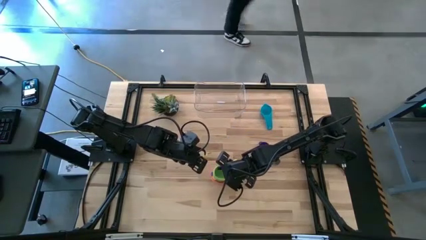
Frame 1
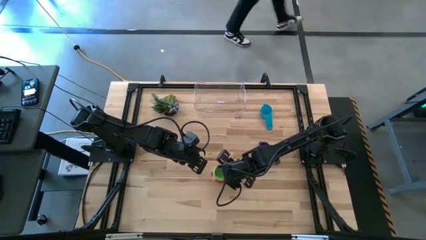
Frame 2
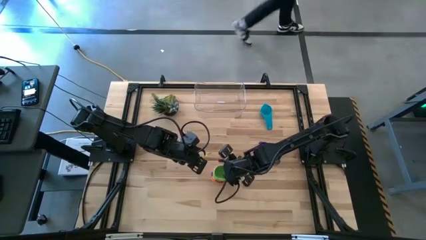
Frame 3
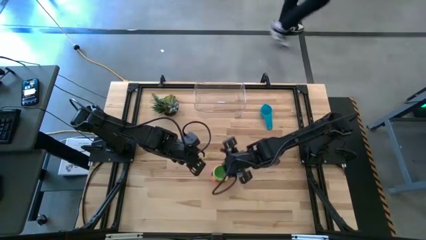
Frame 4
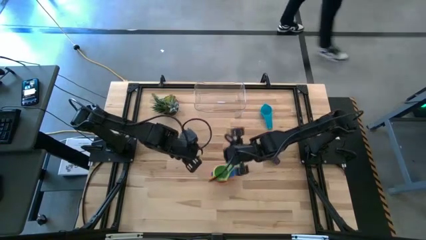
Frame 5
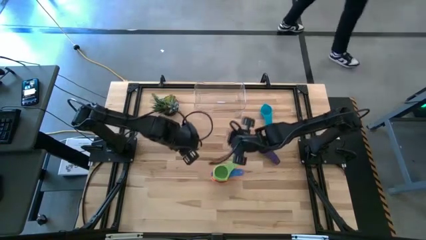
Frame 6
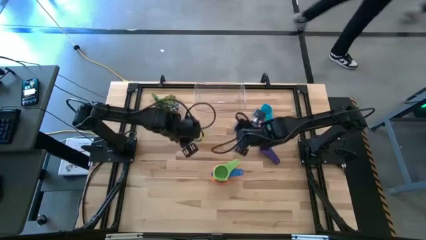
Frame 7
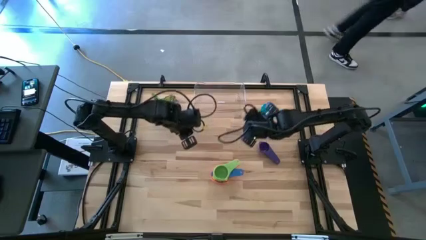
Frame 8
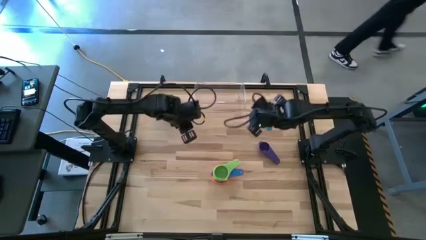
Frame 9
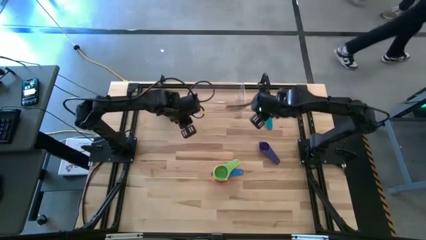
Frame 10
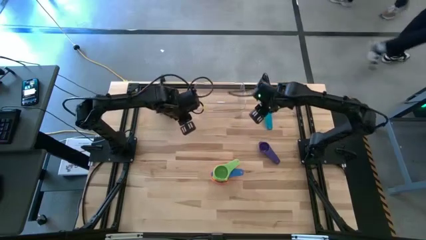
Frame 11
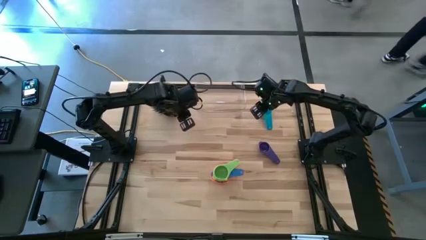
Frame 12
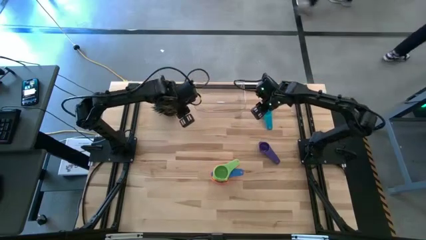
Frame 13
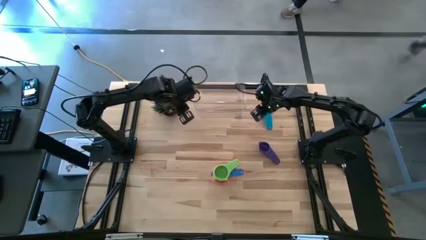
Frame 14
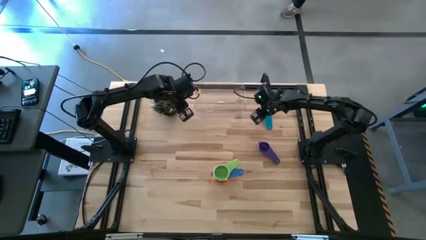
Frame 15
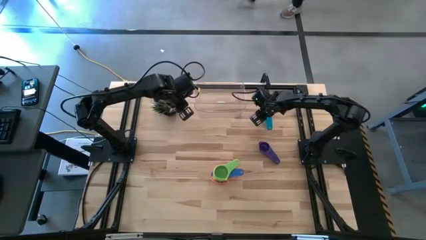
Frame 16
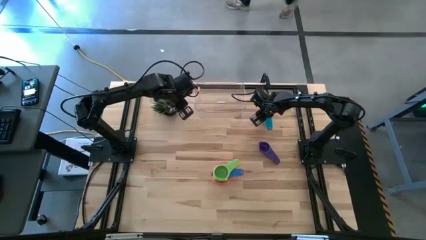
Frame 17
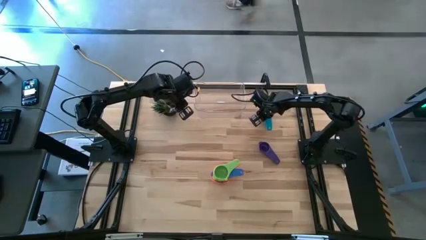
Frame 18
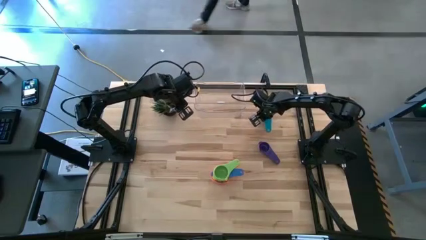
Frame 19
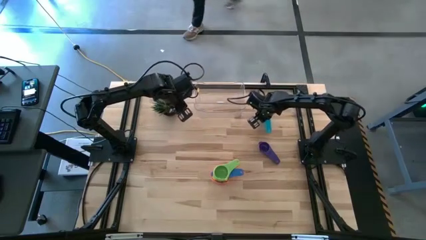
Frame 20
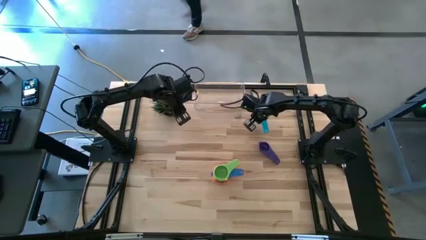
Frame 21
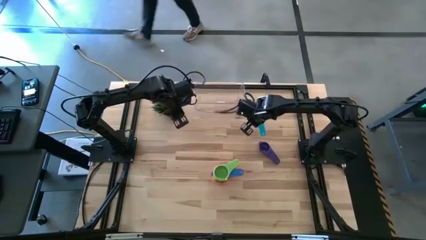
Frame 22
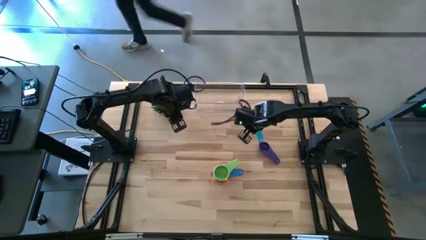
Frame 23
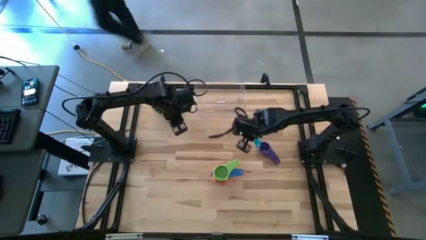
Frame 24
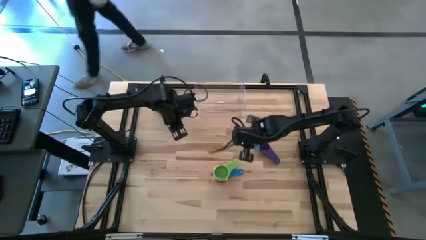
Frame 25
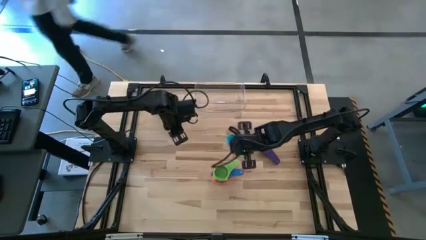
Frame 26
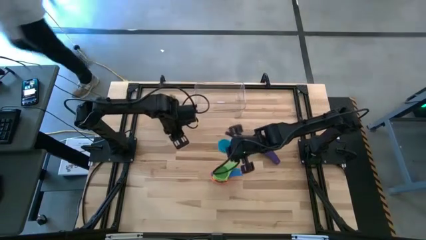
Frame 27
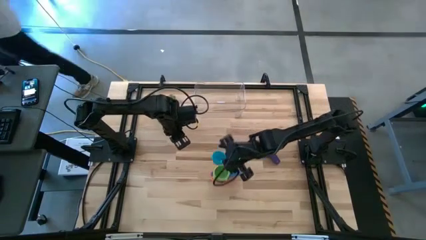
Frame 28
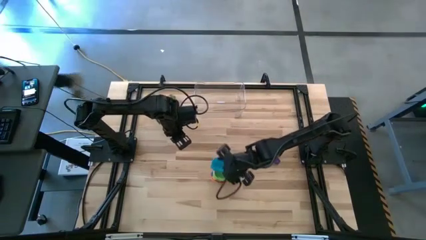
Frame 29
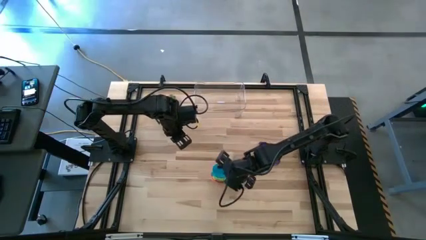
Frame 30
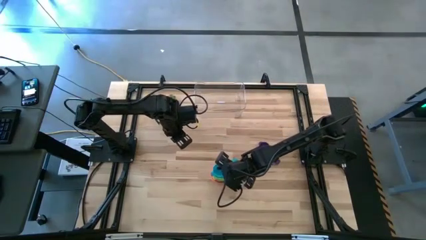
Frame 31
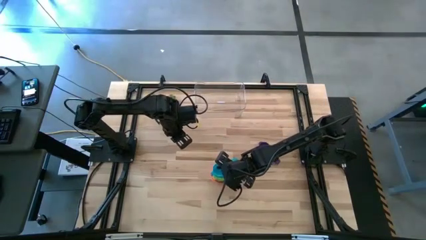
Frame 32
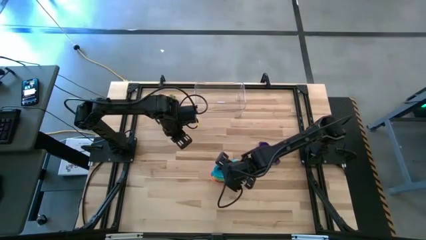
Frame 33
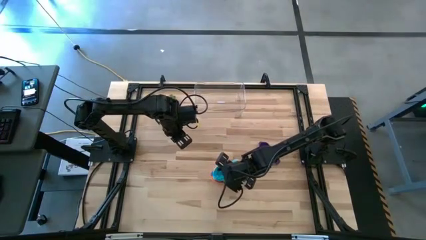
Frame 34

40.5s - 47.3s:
Task: Nest measuring cups in basket
Stack the light blue measuring cup on the green measuring cup

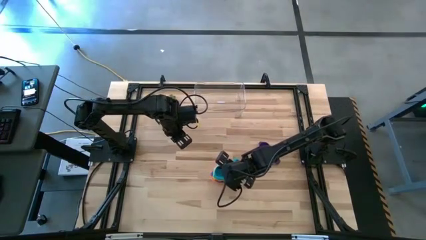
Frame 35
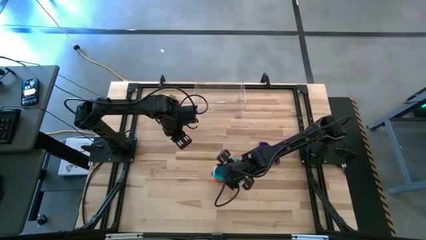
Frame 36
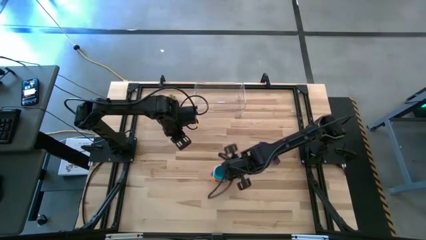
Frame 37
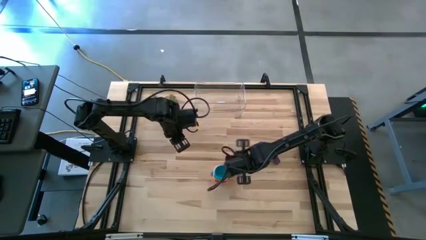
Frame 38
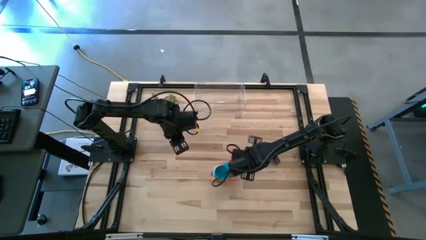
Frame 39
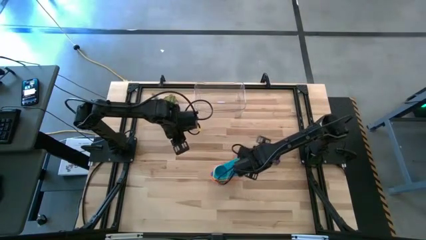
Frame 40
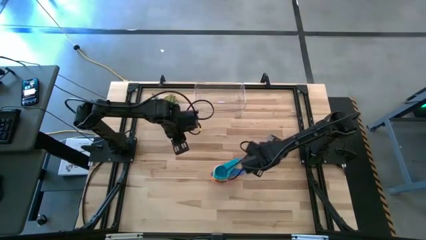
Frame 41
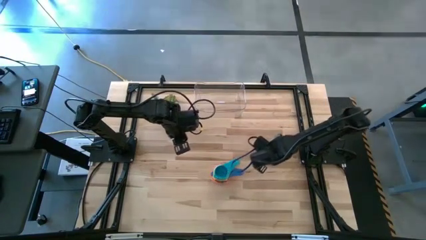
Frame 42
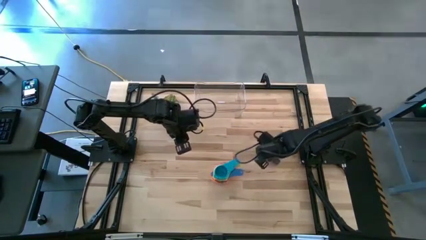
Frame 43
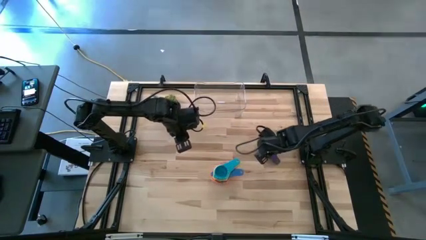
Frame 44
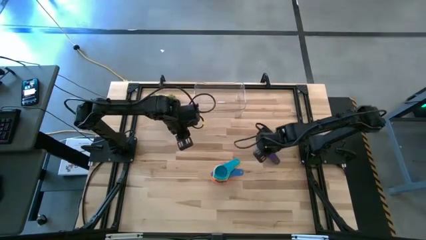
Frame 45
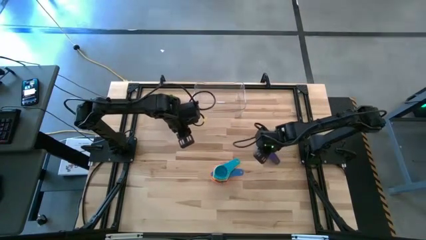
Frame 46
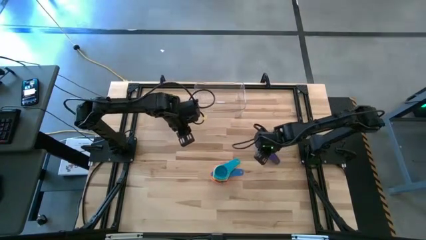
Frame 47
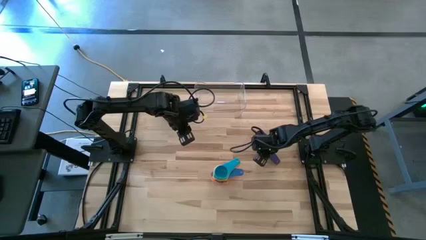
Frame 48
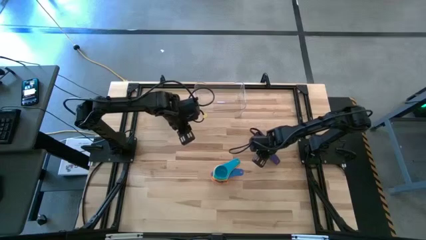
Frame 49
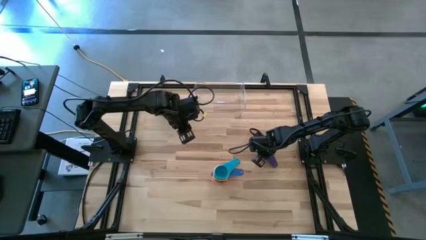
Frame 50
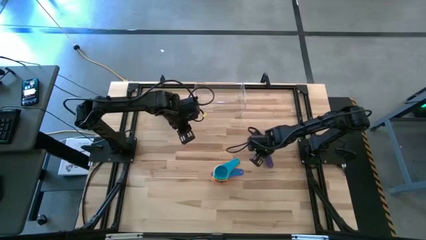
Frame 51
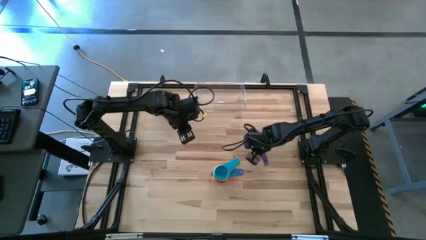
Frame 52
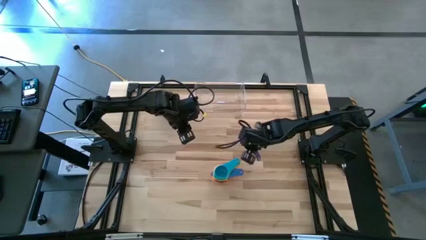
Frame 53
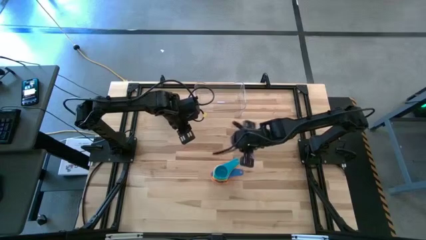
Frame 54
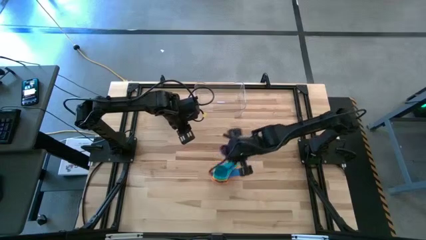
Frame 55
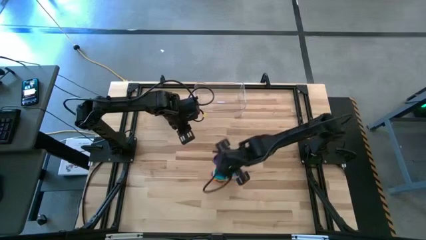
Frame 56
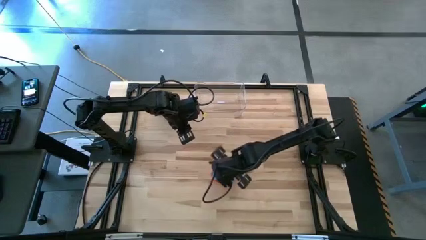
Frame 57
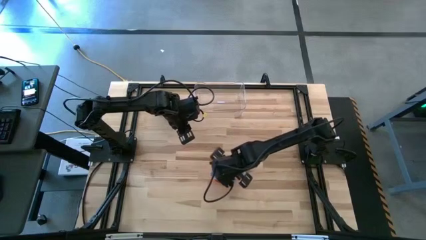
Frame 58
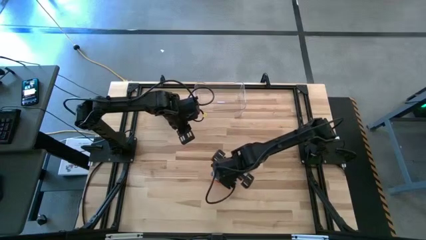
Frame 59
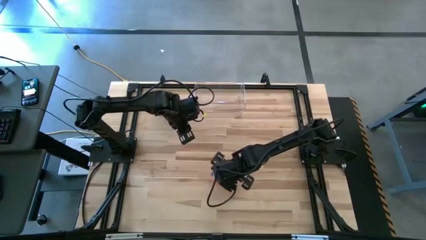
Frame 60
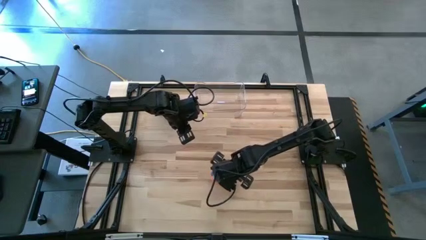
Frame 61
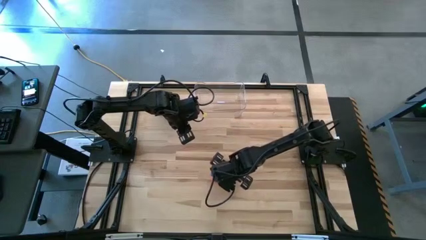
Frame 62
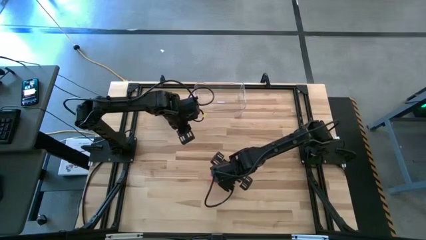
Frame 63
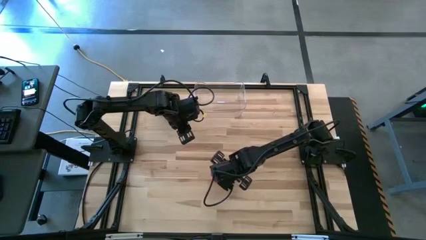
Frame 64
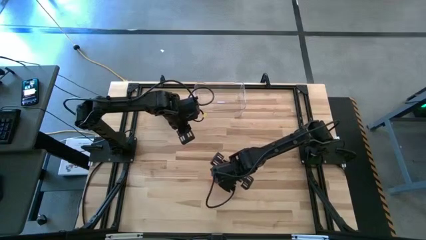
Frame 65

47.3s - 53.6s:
Stack the purple measuring cup on the light blue measuring cup

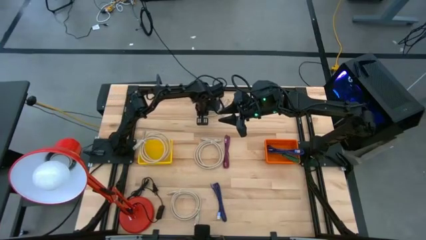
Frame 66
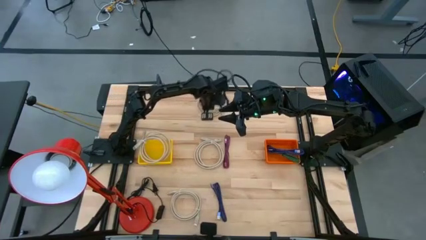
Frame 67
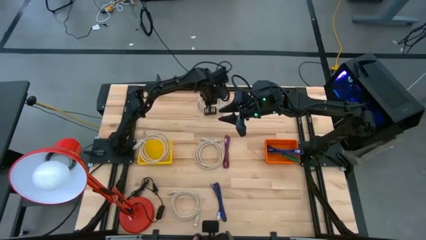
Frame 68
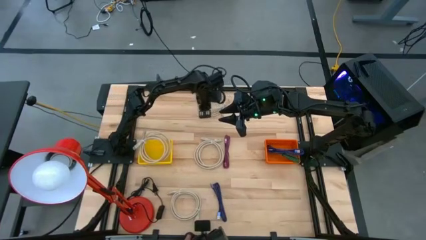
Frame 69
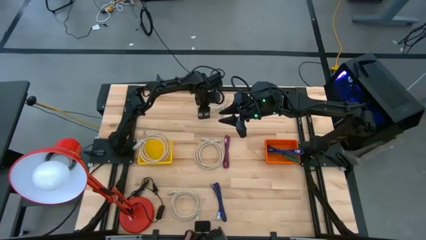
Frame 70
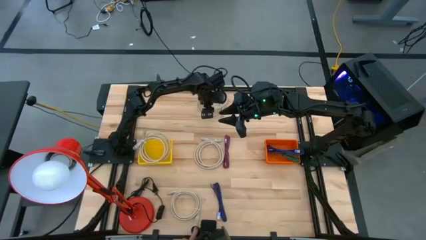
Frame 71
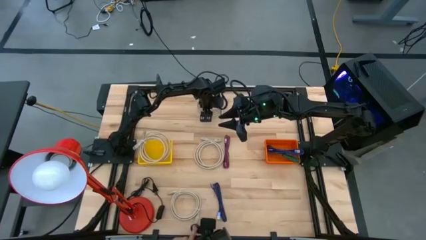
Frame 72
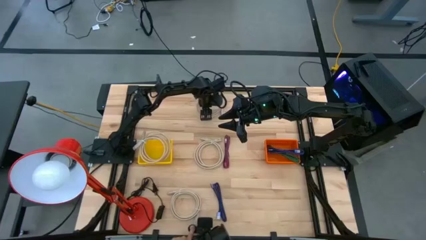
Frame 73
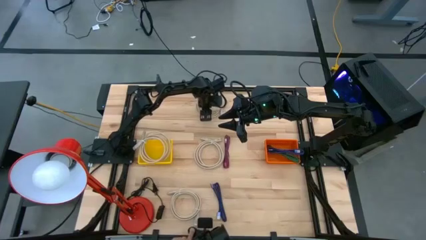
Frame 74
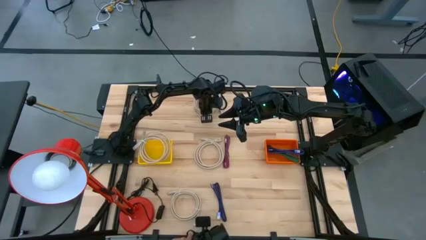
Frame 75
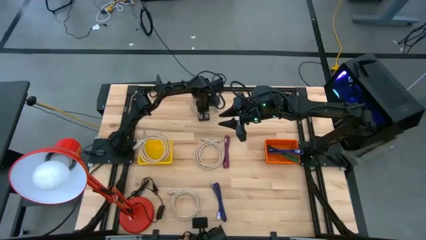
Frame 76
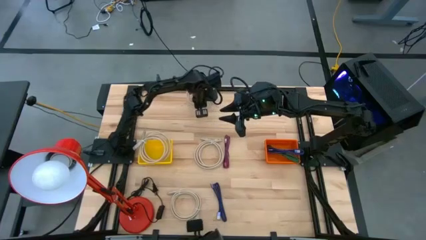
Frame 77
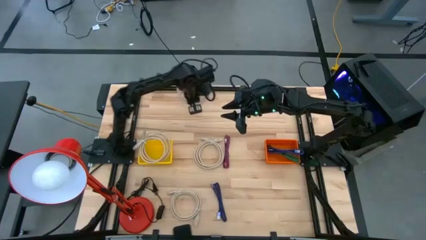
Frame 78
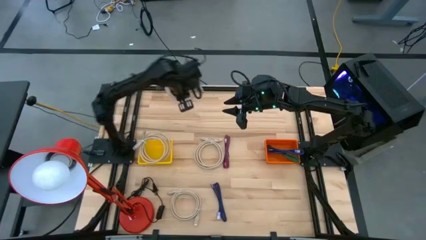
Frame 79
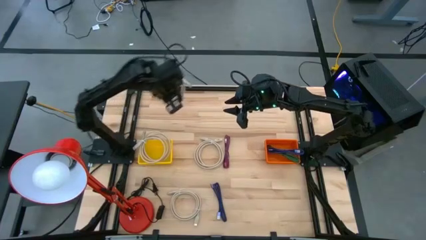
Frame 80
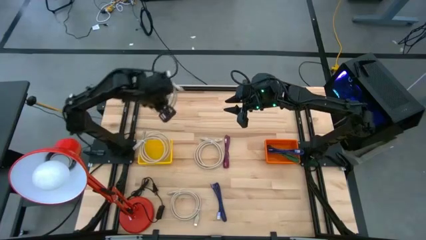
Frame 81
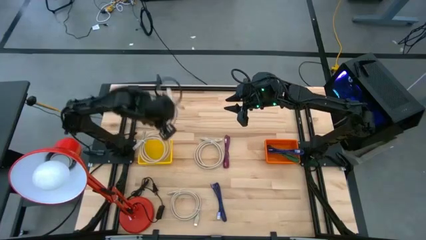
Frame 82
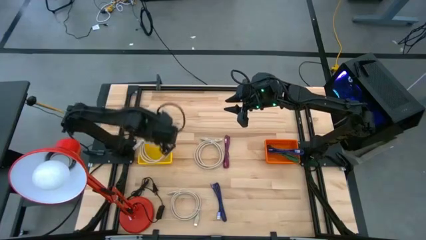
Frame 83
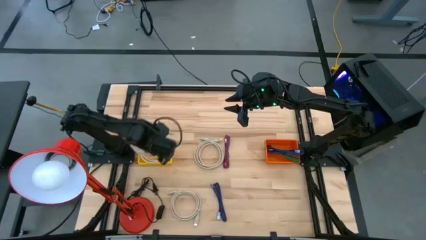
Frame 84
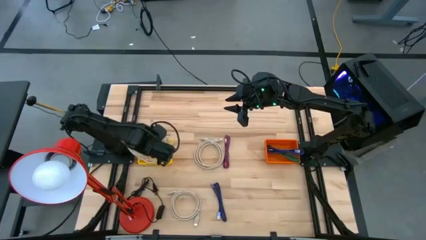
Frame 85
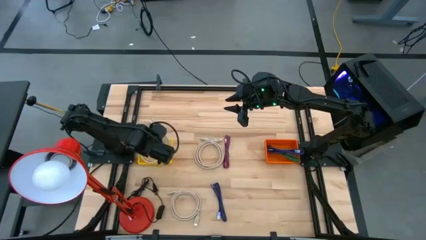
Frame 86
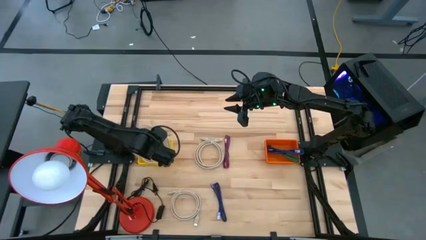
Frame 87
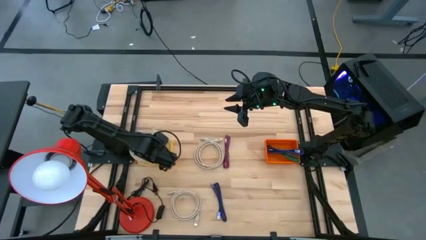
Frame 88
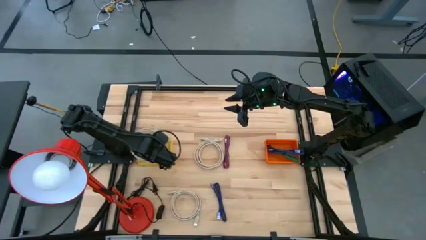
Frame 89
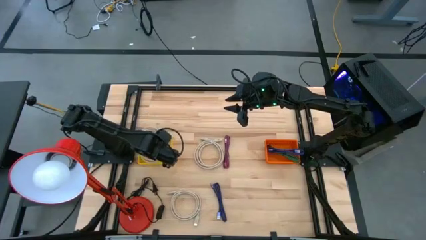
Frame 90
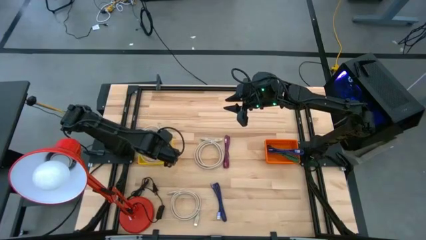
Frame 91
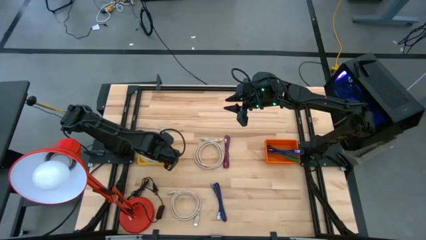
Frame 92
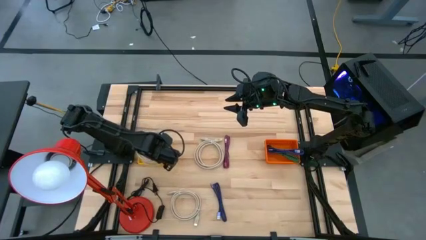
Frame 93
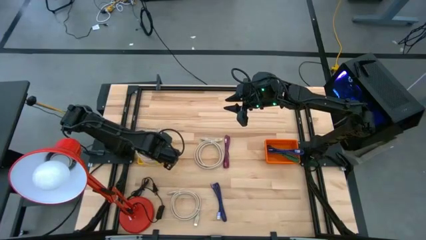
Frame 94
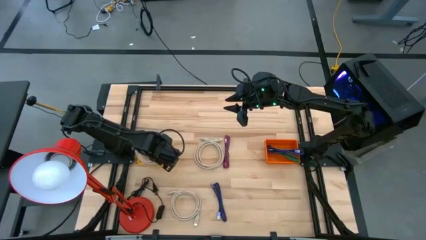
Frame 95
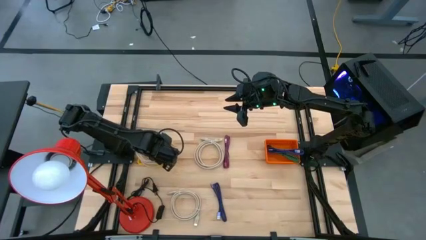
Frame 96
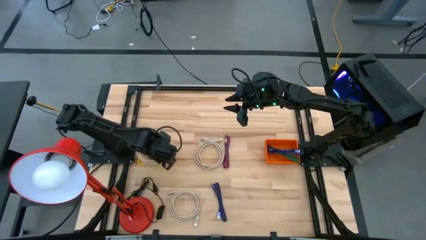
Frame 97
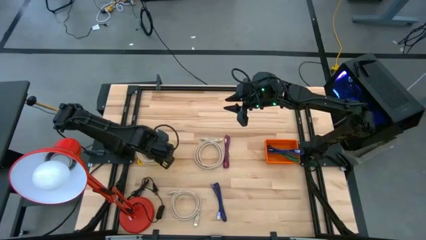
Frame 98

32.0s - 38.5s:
Task: Pick & Place USB Port
Put the light brown HDMI cable into the yellow bin
